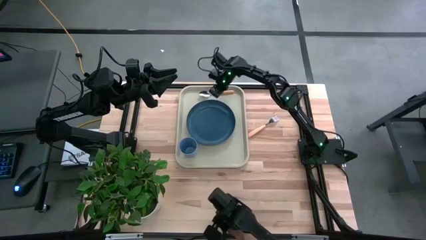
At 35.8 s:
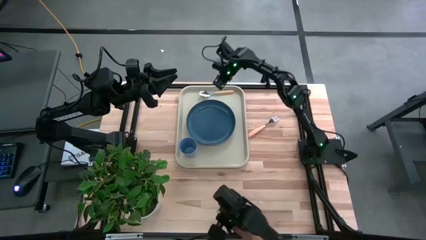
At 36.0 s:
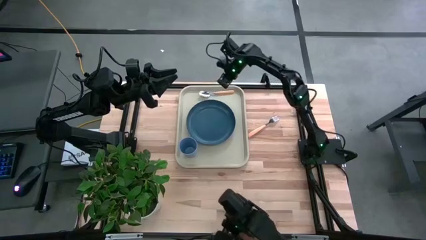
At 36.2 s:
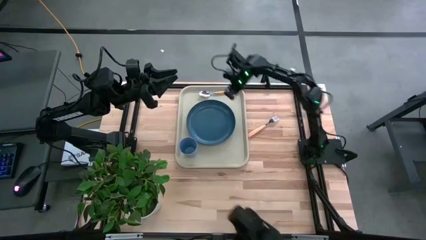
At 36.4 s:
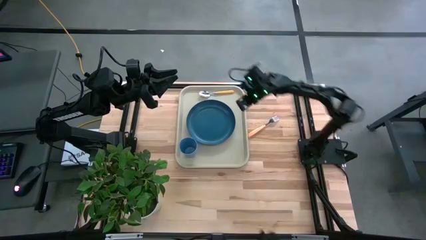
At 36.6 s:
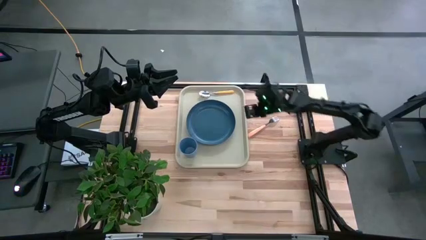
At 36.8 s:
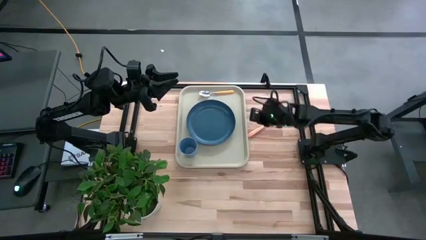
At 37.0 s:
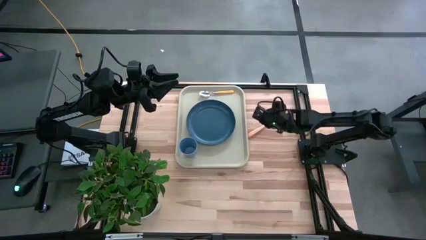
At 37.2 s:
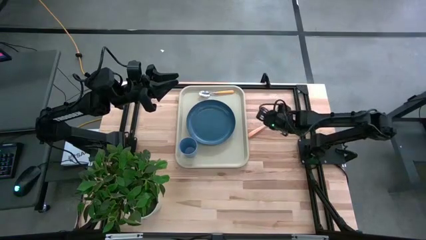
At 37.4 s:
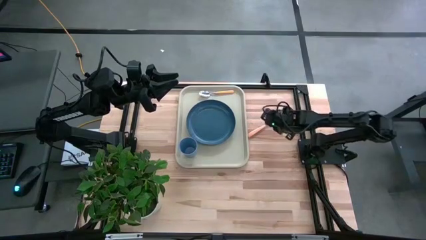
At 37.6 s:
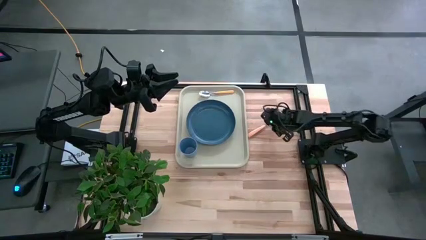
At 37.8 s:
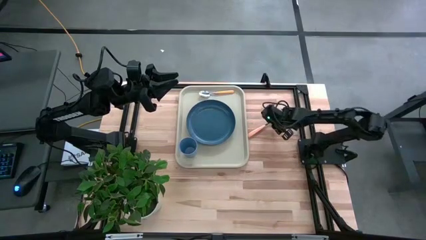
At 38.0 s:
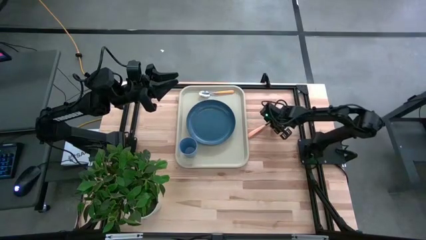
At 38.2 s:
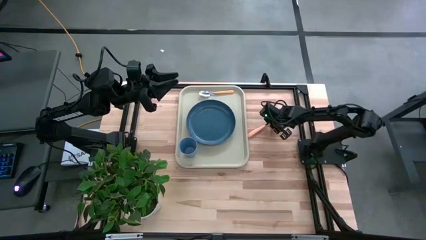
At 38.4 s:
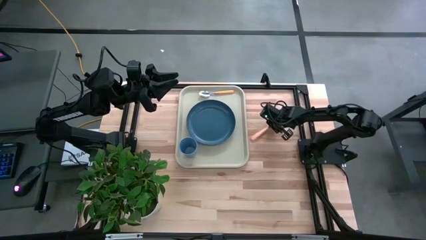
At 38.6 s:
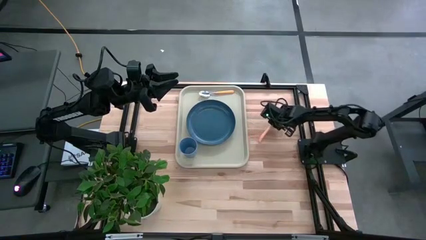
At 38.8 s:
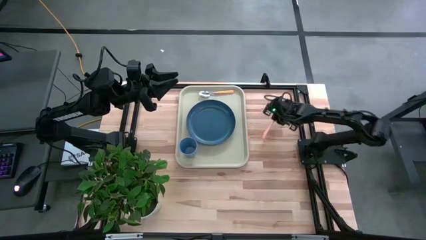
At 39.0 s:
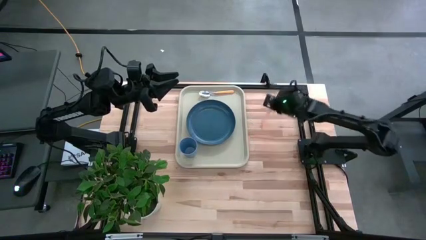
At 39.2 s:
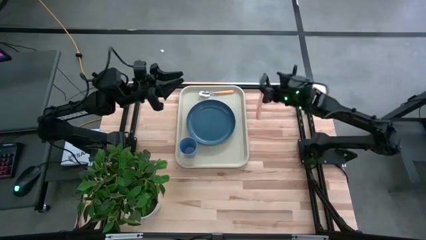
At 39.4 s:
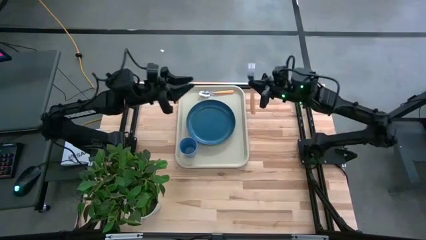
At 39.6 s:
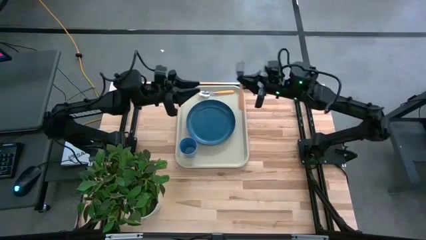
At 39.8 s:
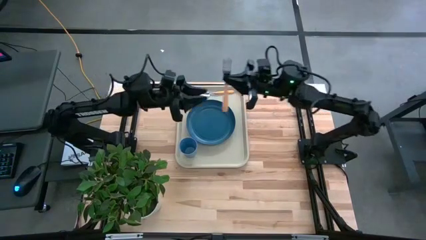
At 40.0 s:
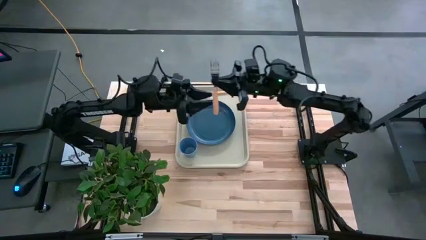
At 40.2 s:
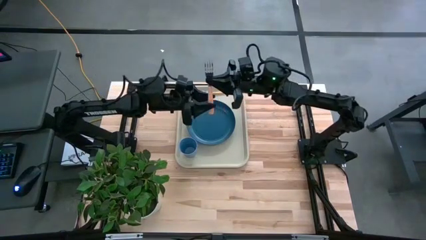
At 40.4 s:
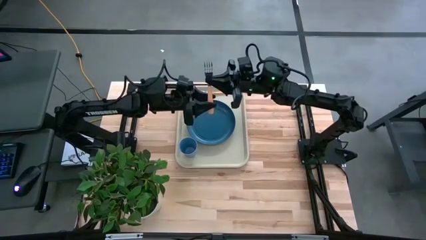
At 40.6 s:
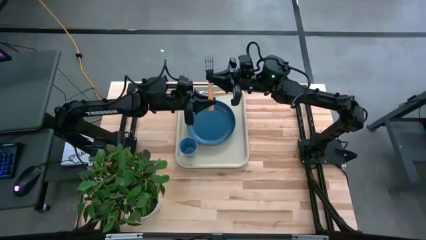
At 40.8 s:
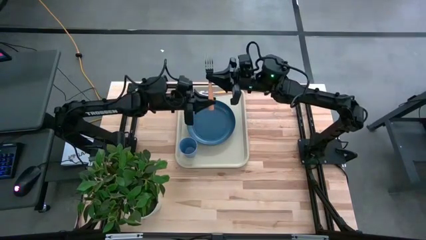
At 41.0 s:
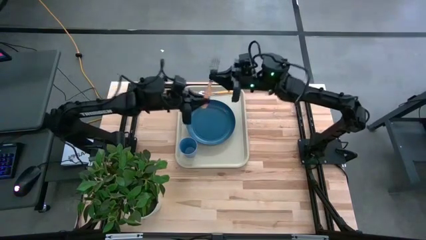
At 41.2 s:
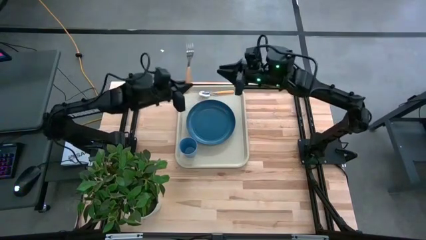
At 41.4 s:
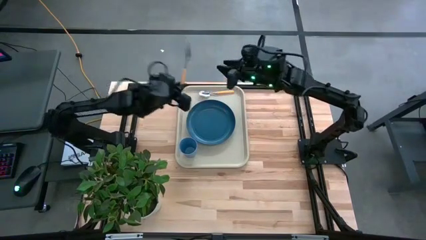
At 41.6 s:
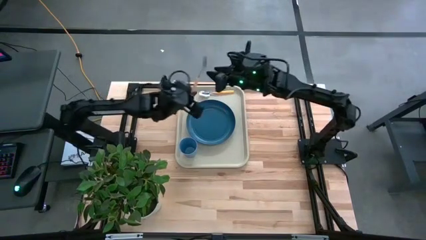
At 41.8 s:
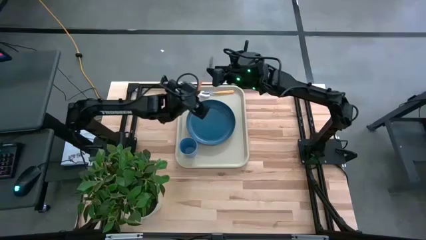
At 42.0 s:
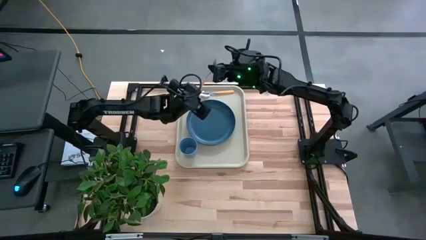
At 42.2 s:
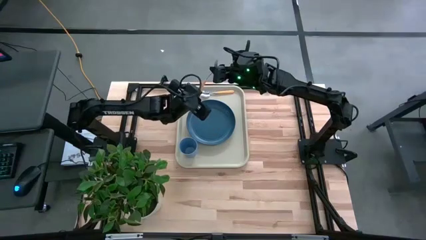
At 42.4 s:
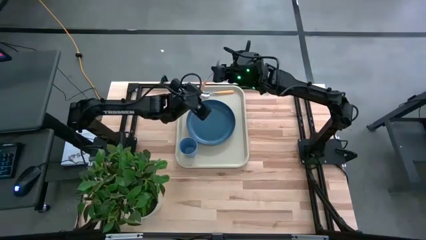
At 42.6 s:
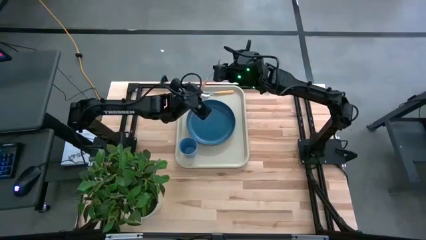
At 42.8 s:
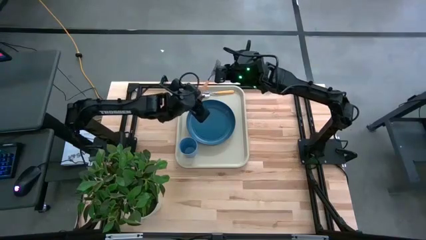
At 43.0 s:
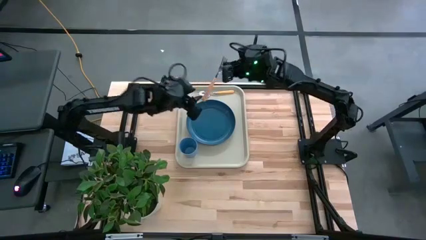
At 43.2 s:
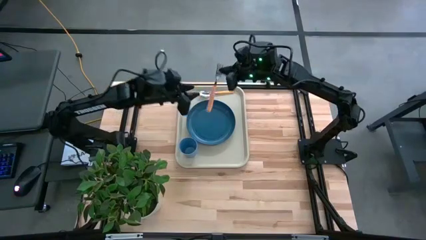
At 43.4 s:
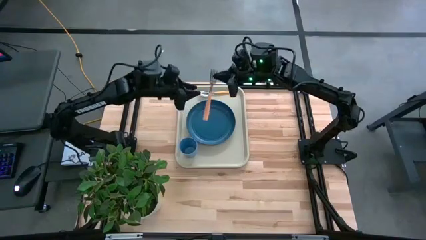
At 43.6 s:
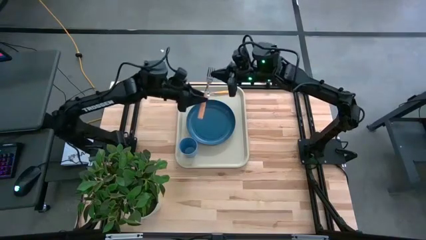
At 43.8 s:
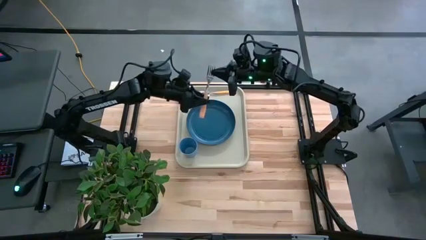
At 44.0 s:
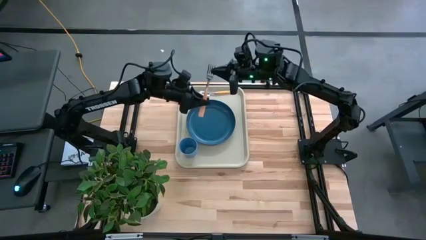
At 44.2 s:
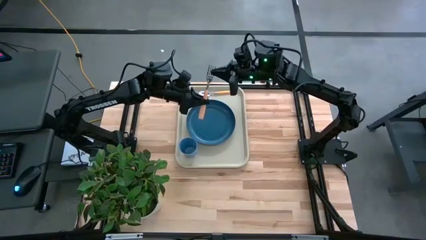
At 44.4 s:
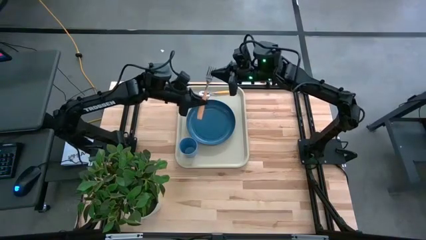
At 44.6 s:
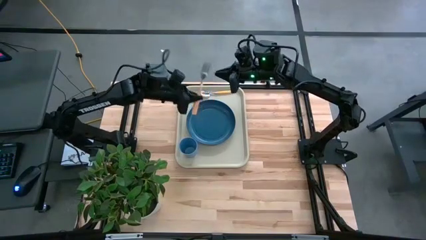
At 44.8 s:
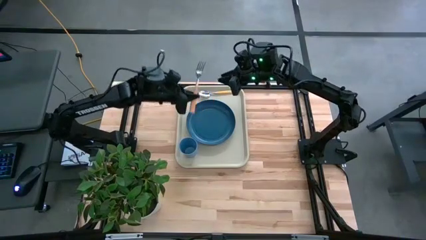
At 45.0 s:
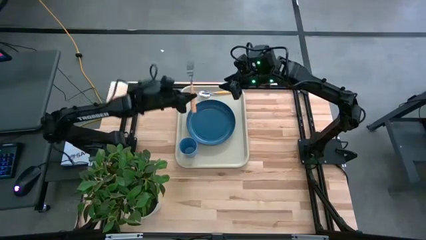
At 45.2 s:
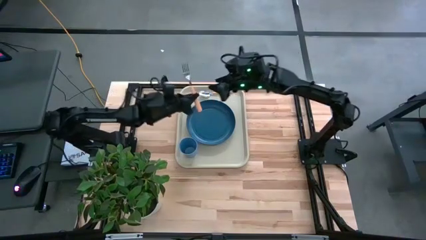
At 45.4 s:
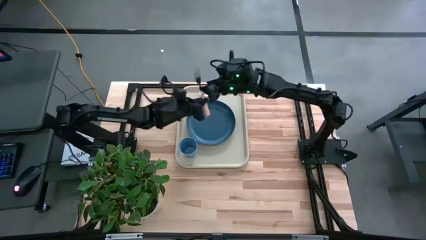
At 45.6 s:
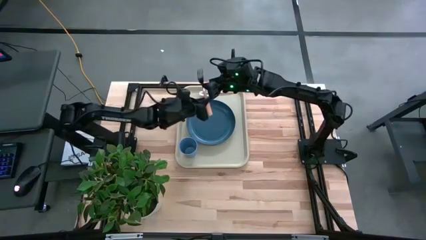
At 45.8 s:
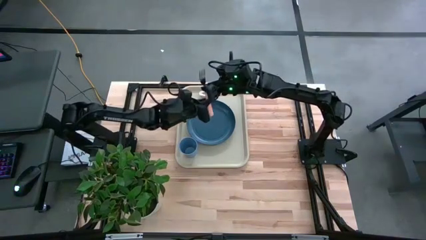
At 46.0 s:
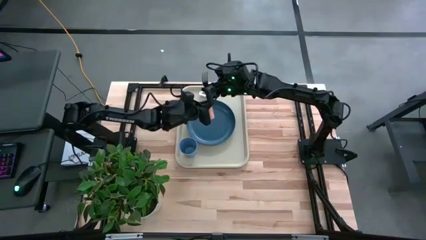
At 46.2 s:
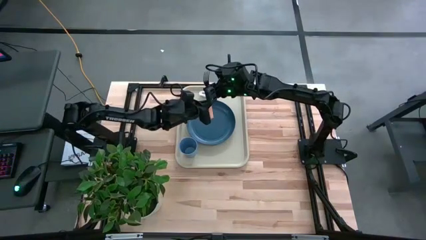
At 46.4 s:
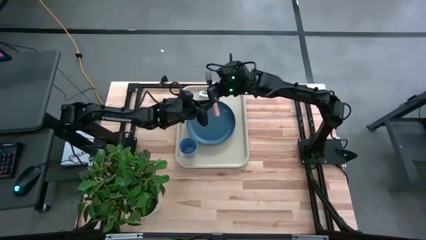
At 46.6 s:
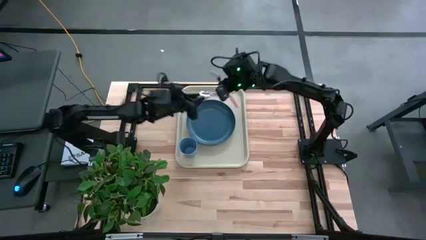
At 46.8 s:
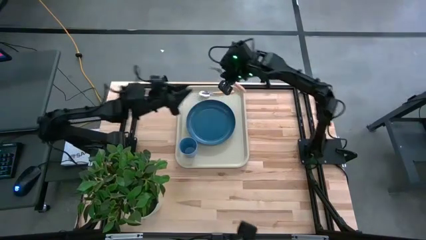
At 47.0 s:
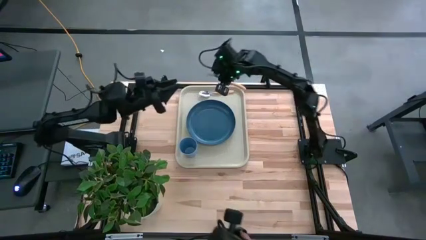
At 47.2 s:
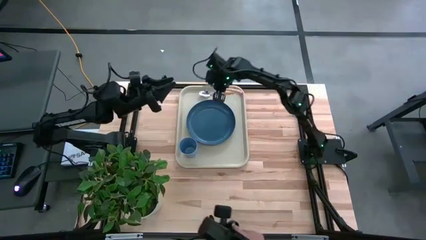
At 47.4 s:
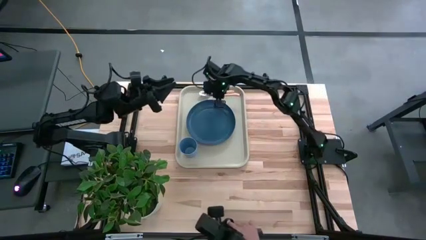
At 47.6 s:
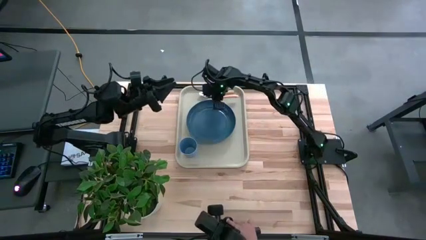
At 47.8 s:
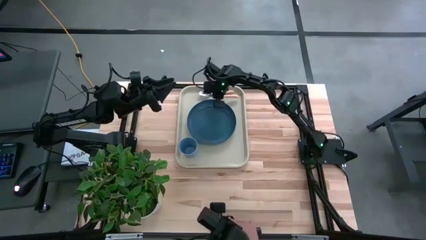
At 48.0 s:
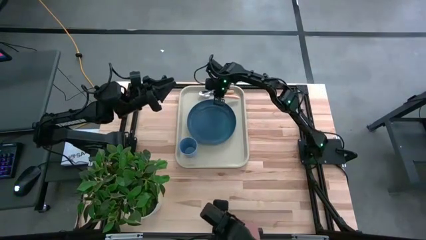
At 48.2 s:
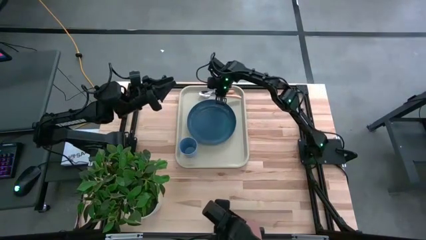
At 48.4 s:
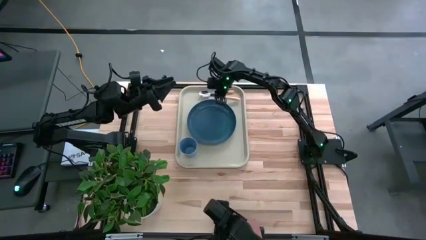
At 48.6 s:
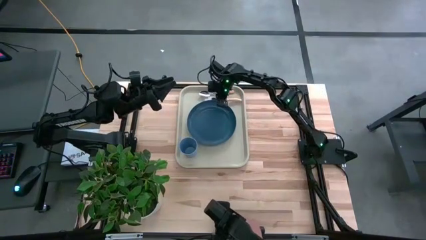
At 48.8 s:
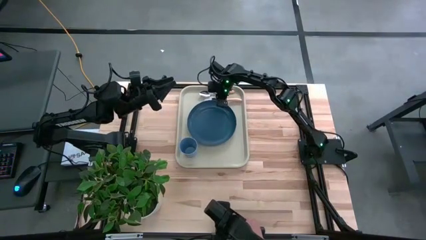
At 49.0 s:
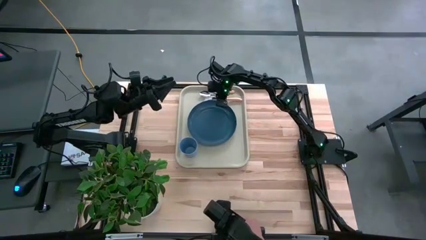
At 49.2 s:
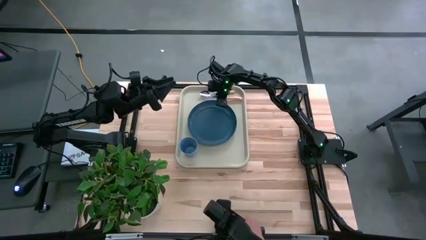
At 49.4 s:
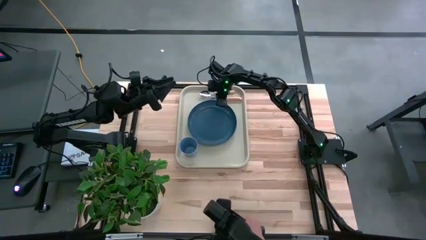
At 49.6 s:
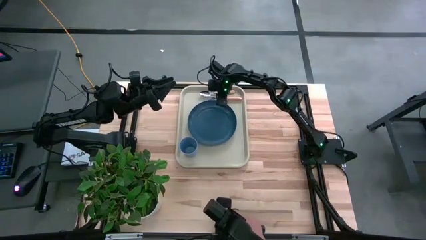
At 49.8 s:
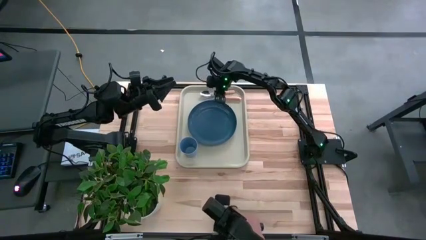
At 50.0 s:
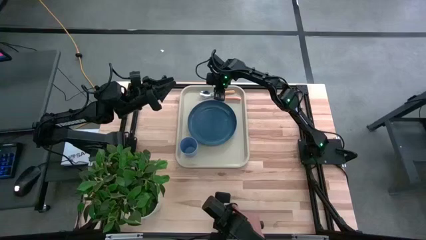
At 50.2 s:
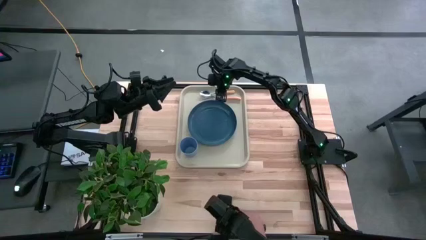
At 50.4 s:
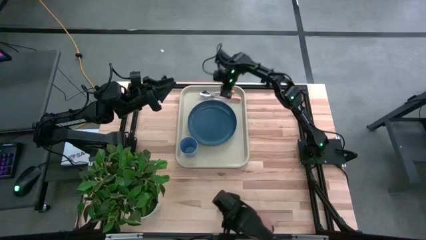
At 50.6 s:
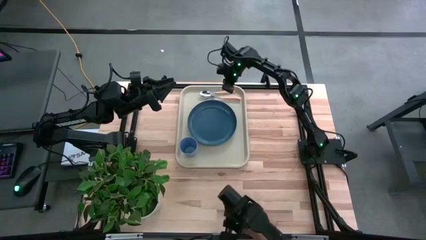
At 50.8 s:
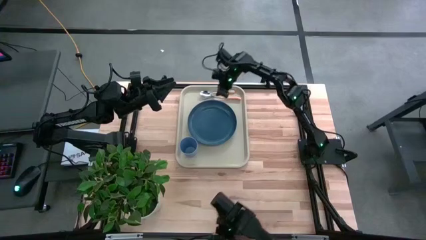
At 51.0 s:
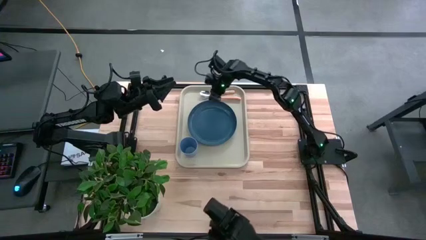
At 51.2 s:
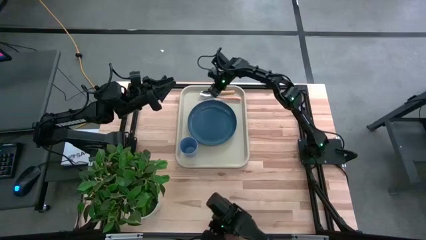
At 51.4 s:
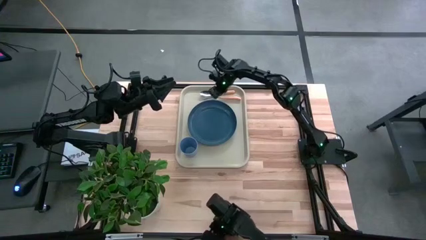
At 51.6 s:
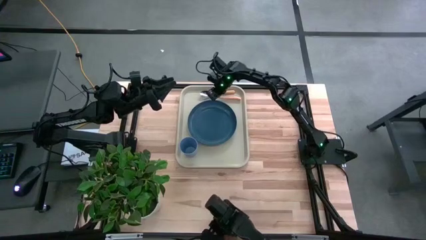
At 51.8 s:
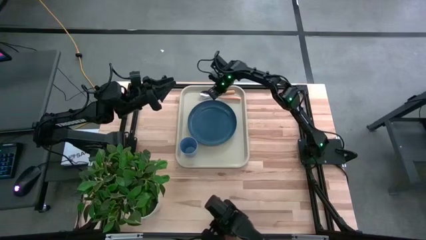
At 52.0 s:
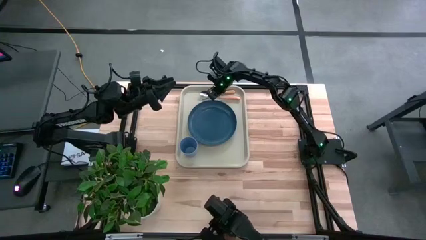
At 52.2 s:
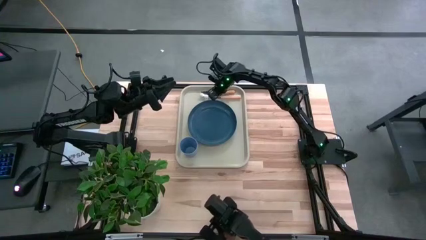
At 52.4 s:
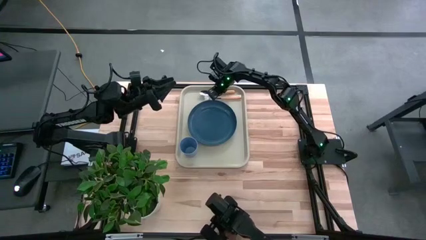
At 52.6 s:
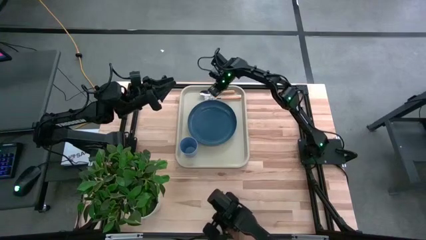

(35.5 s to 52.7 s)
Task: Pick and place plate/cup/fork/spoon on tray
Put the brown fork on the white tray to the top of the blue plate
